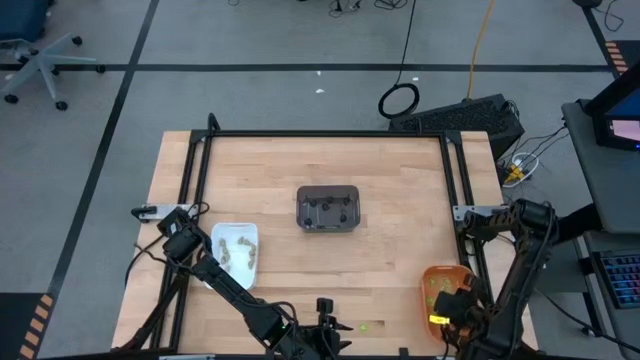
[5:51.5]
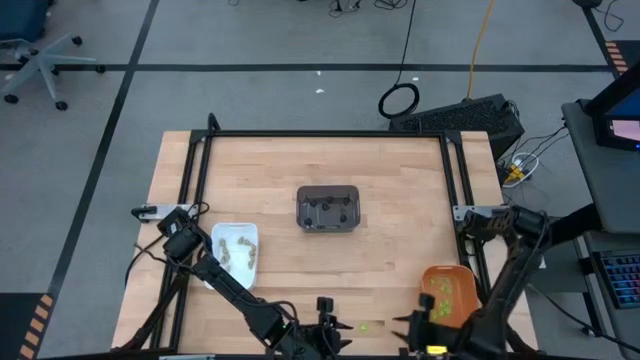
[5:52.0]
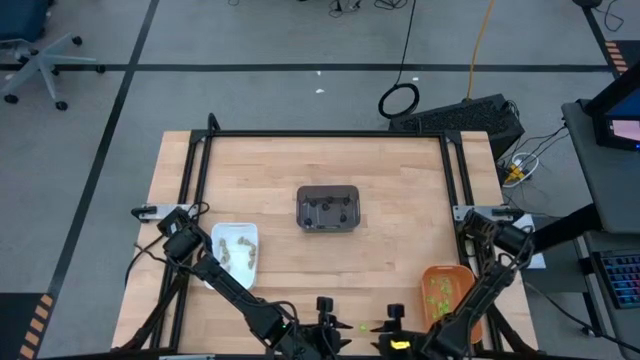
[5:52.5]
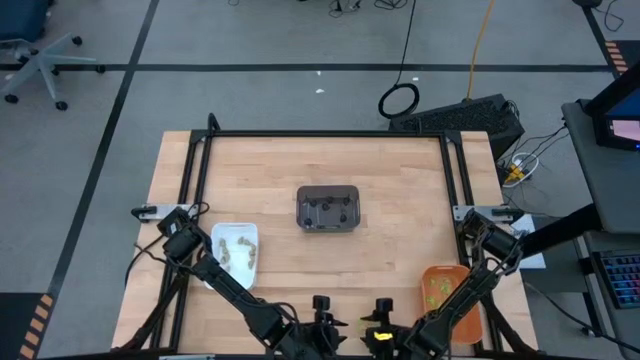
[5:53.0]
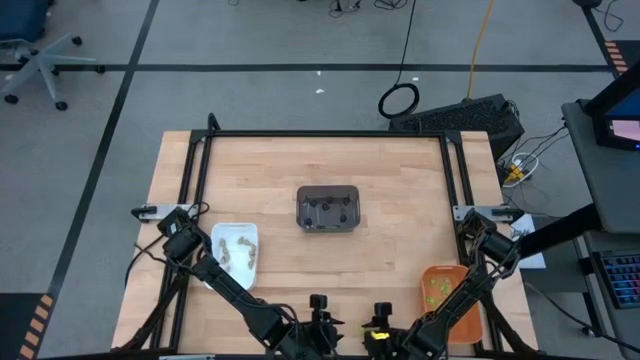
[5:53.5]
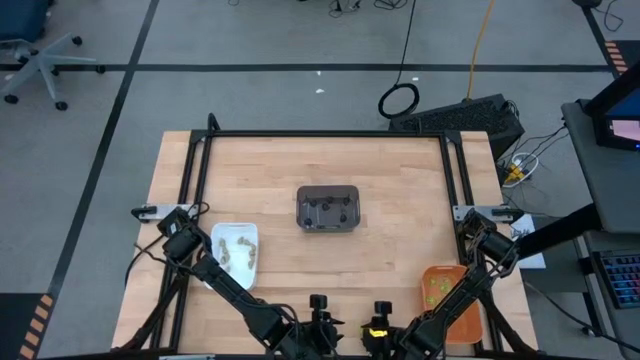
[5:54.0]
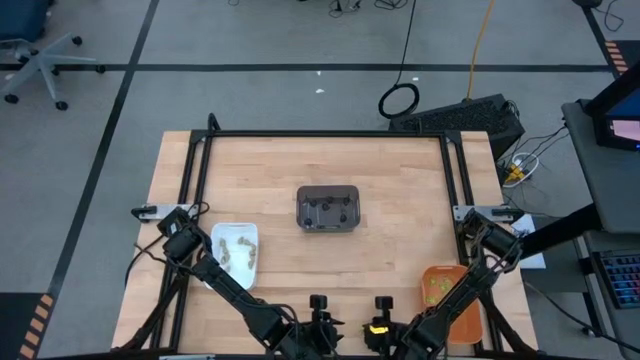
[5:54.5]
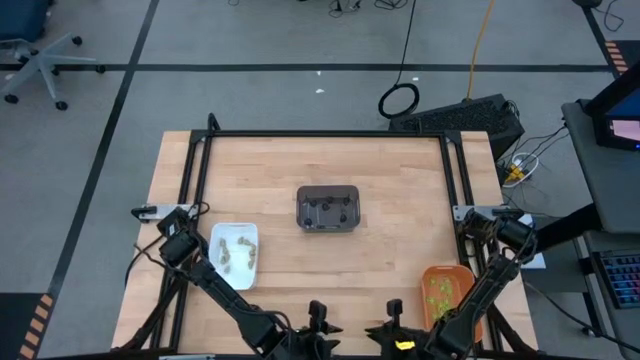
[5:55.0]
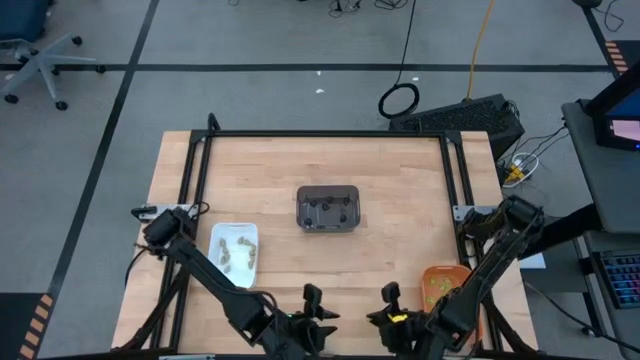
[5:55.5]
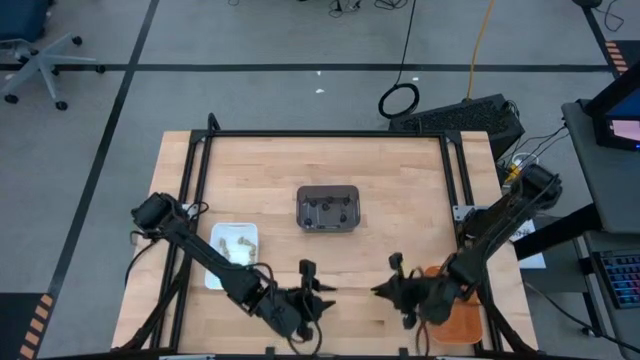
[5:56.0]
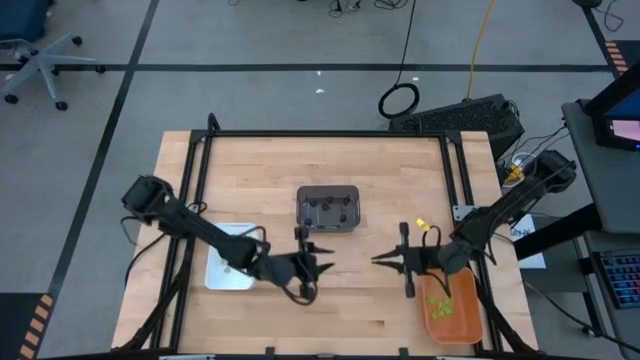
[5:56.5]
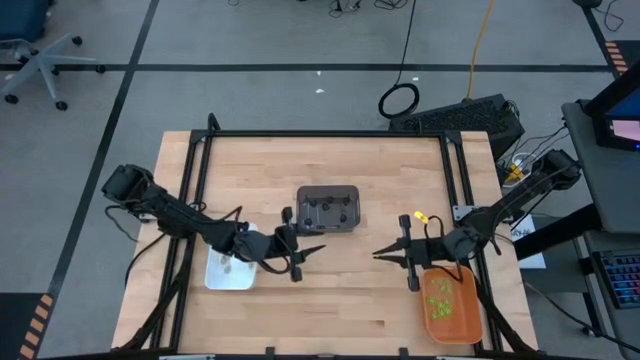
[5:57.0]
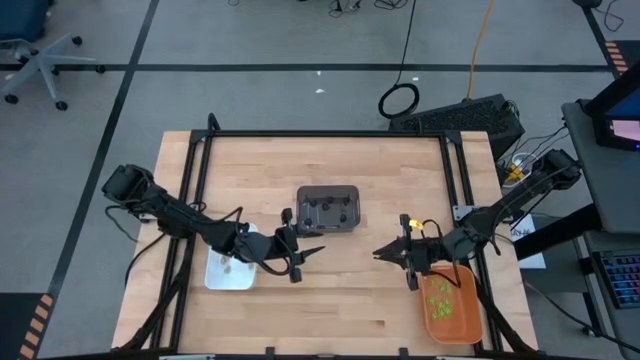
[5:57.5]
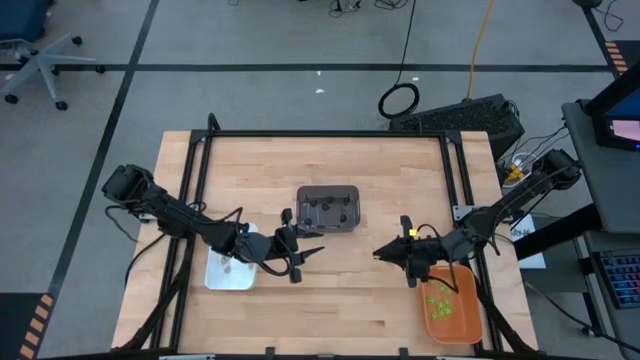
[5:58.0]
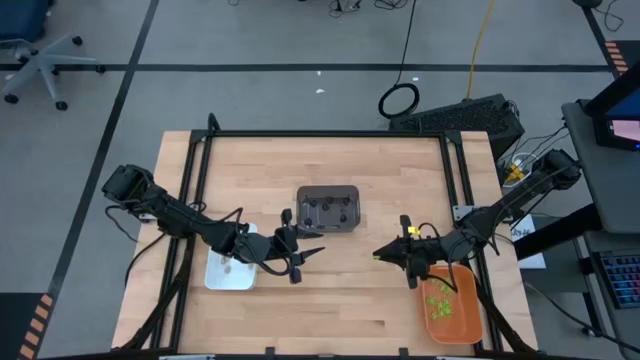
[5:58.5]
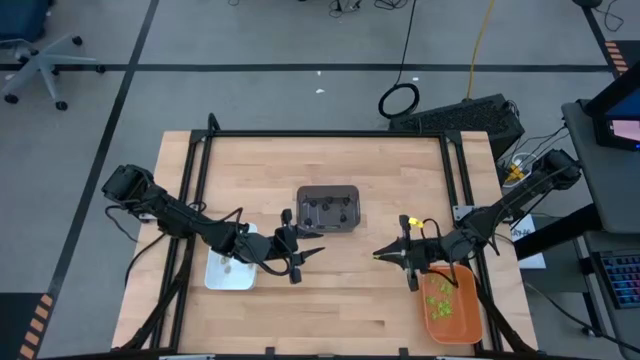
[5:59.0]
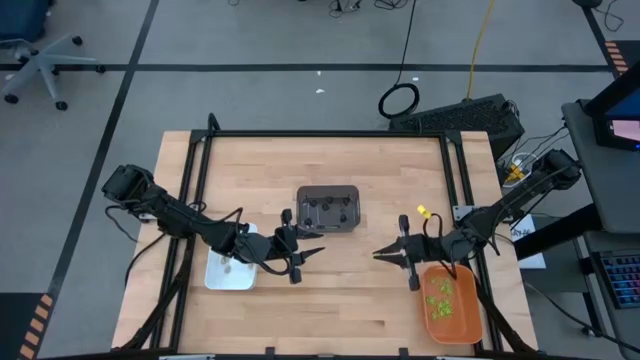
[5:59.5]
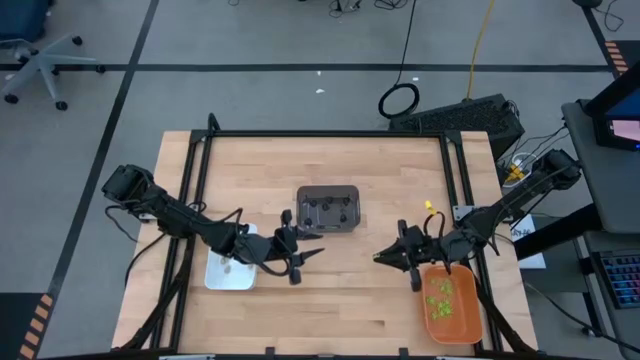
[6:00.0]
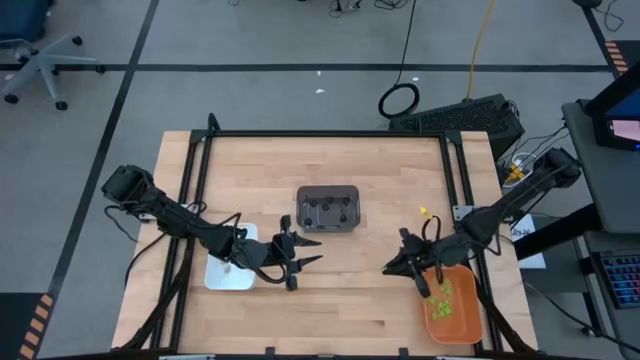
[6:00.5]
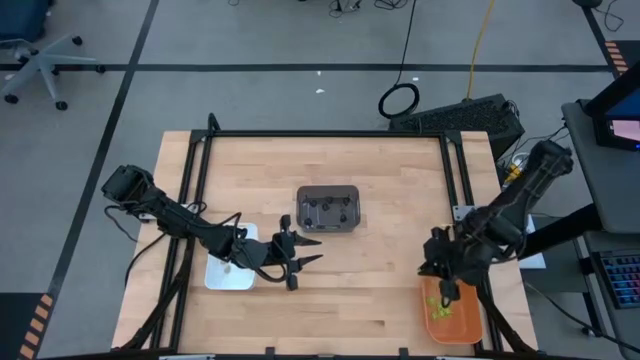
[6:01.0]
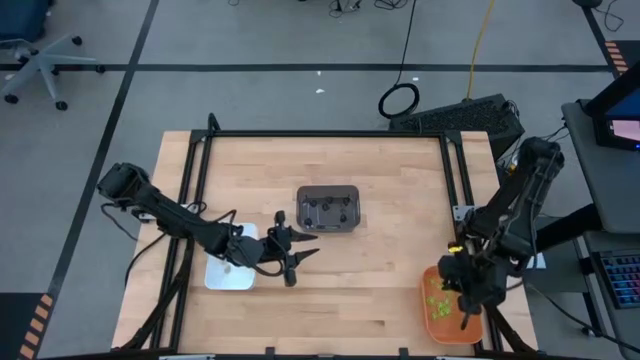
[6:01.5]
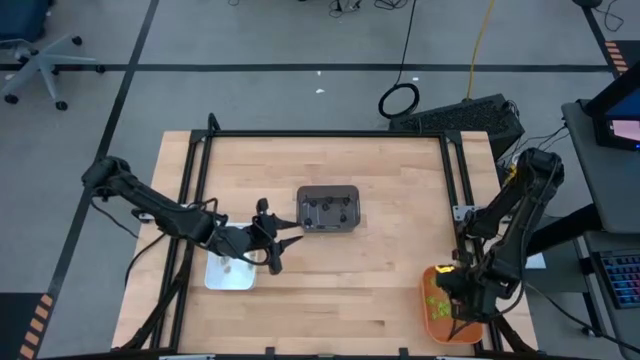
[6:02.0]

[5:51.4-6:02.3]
Task: Sort Halloween decoration
Put the green spider toy into the orange bin

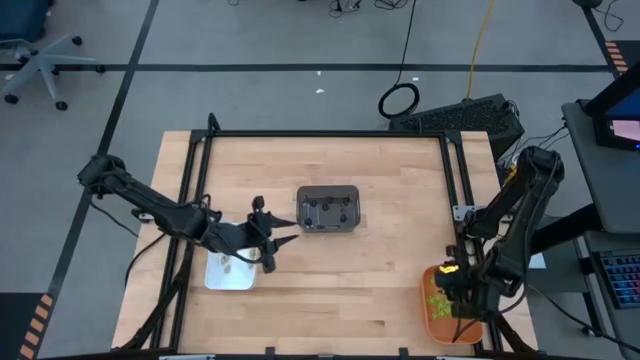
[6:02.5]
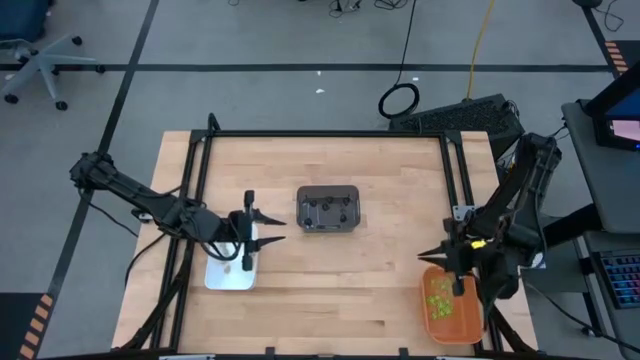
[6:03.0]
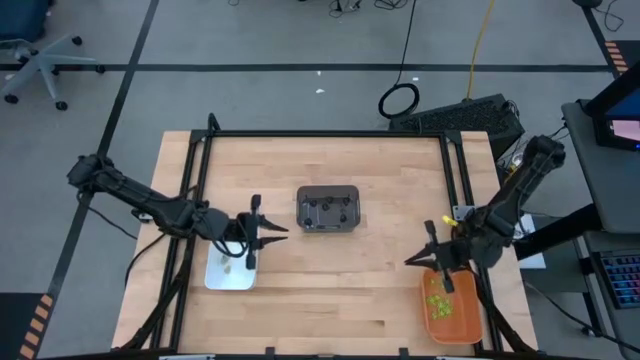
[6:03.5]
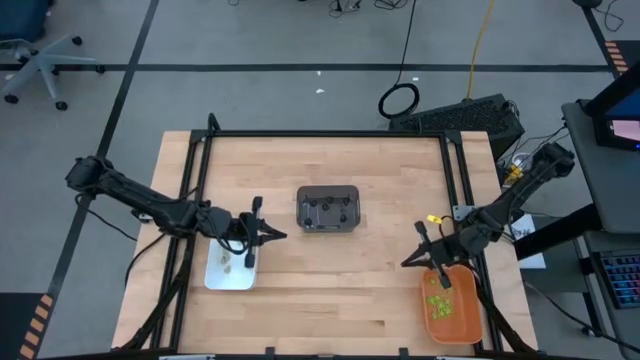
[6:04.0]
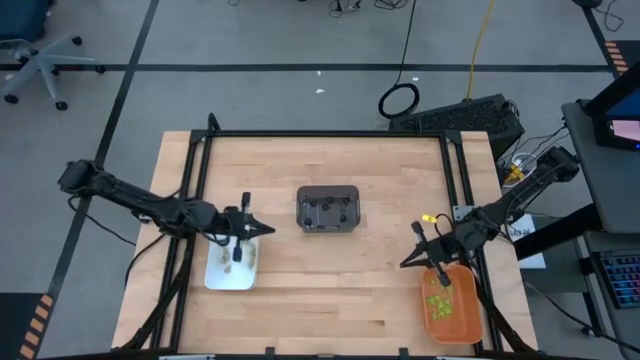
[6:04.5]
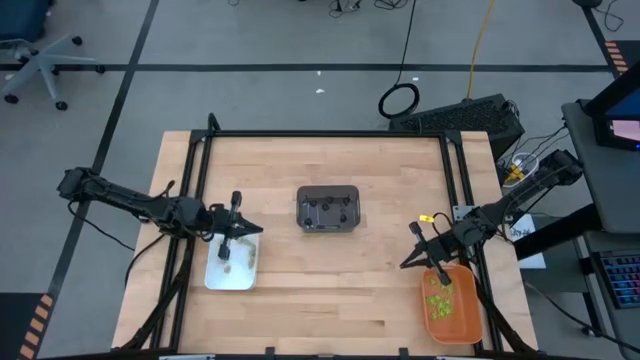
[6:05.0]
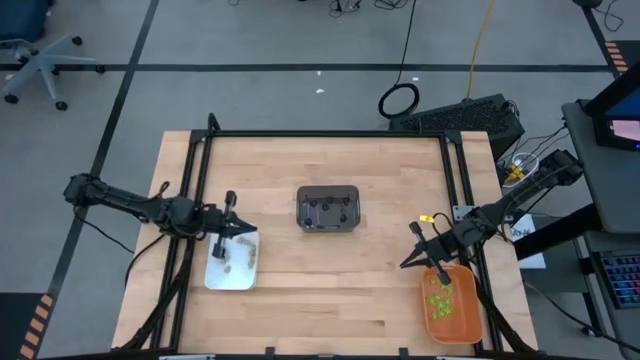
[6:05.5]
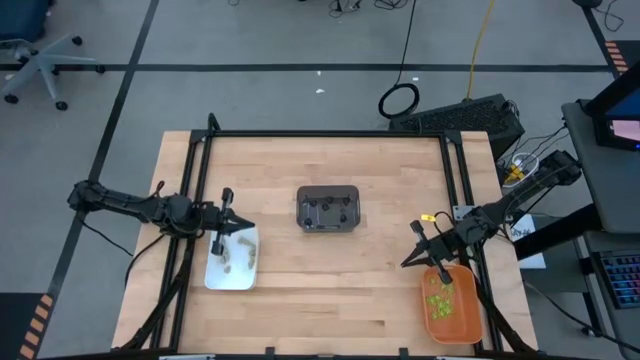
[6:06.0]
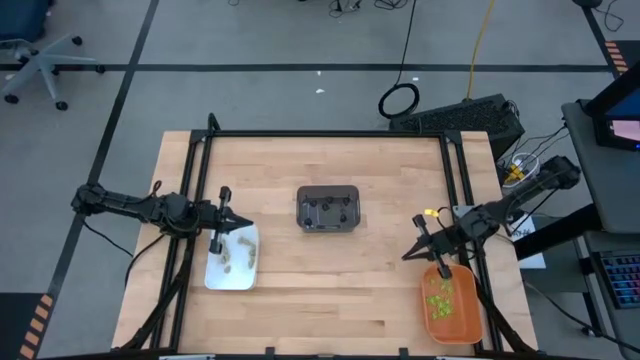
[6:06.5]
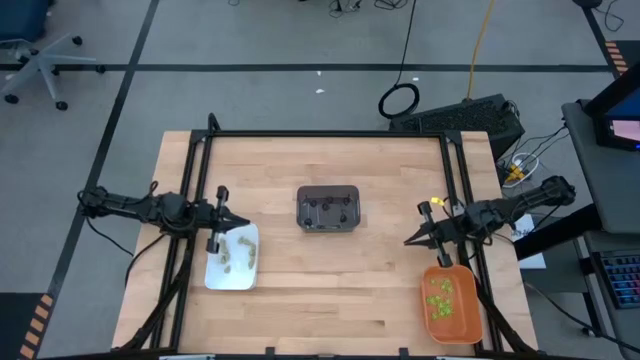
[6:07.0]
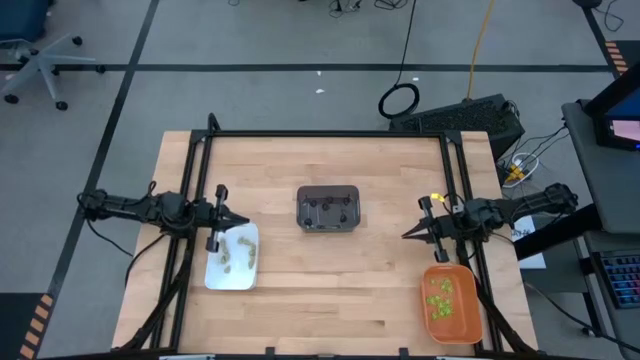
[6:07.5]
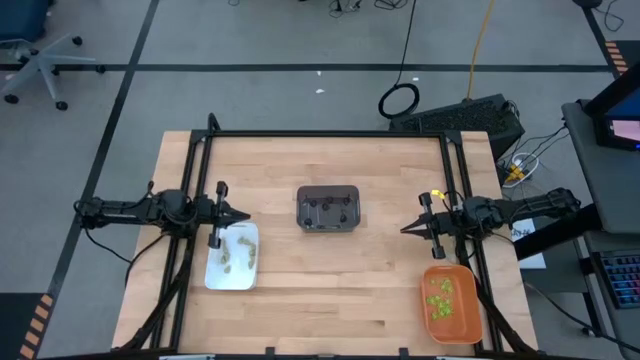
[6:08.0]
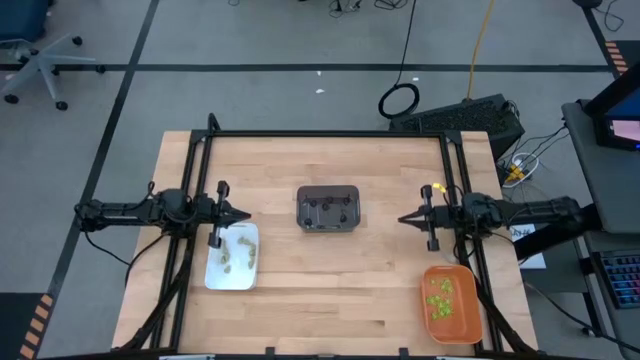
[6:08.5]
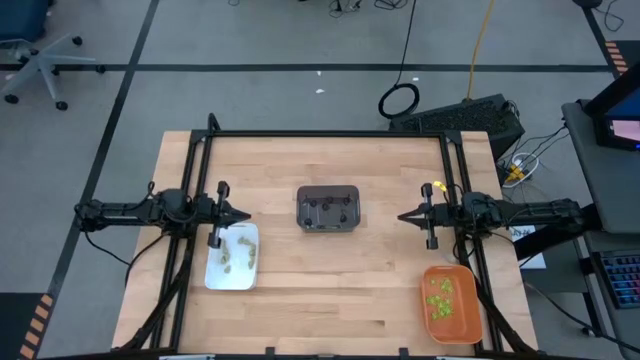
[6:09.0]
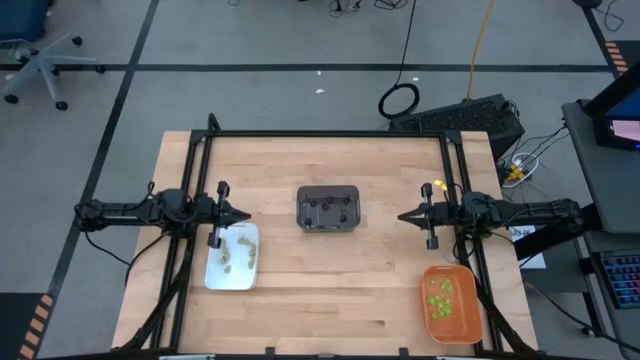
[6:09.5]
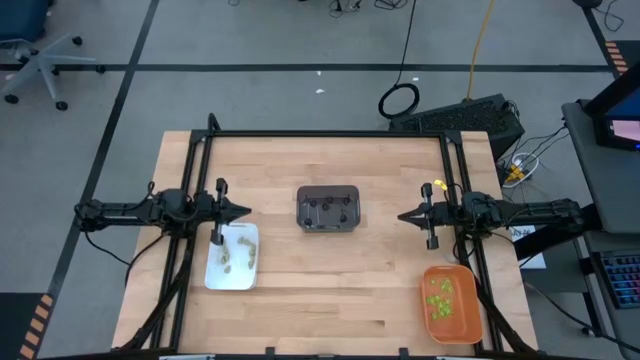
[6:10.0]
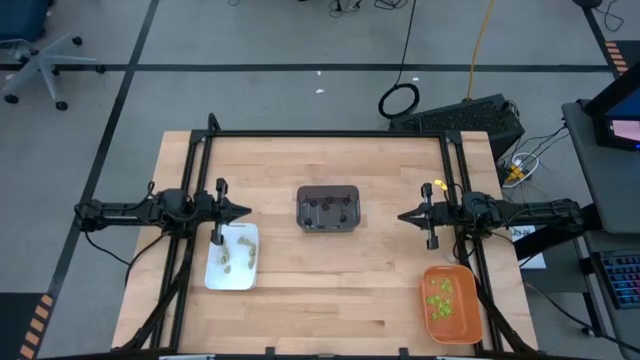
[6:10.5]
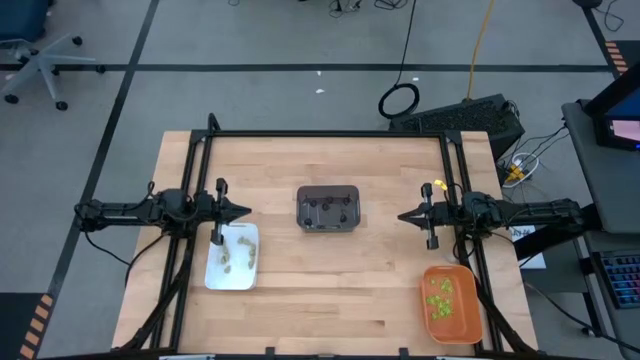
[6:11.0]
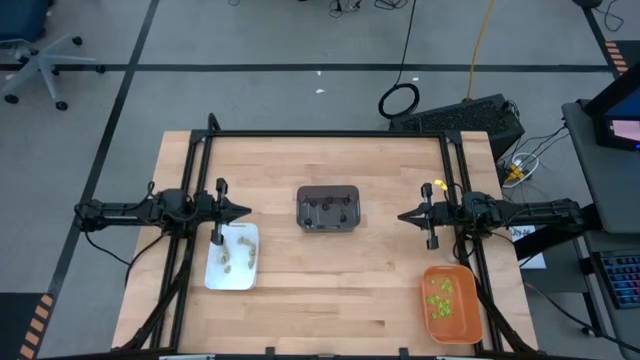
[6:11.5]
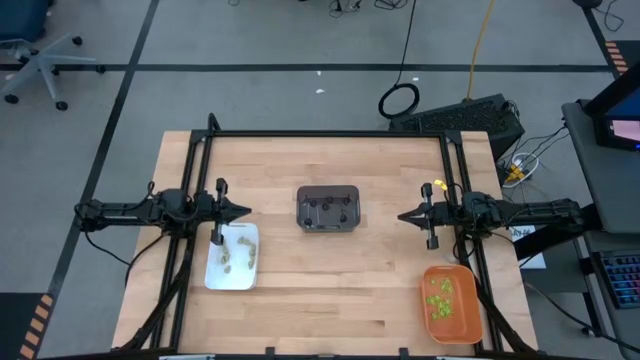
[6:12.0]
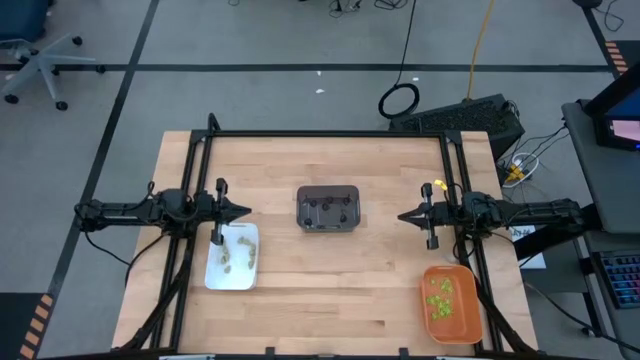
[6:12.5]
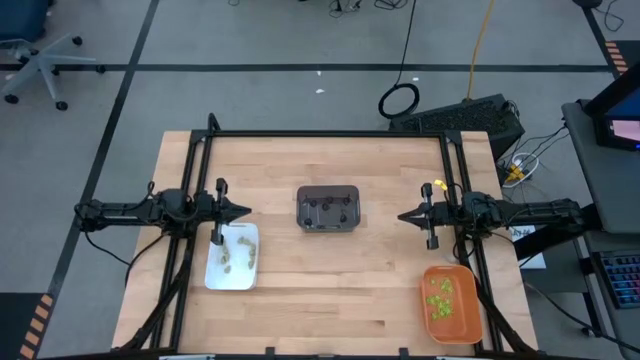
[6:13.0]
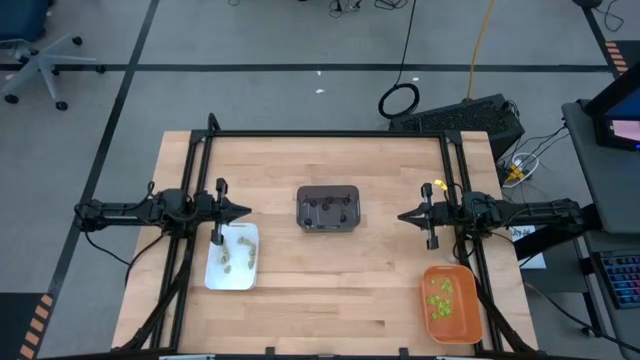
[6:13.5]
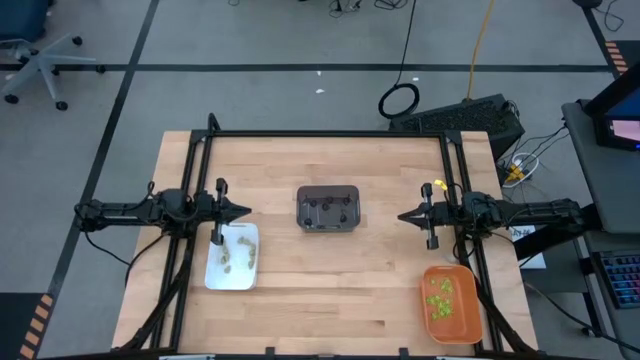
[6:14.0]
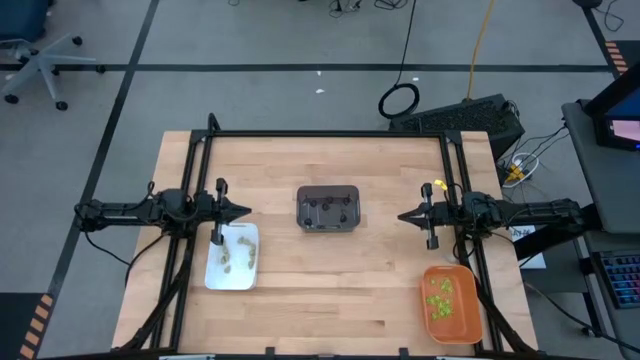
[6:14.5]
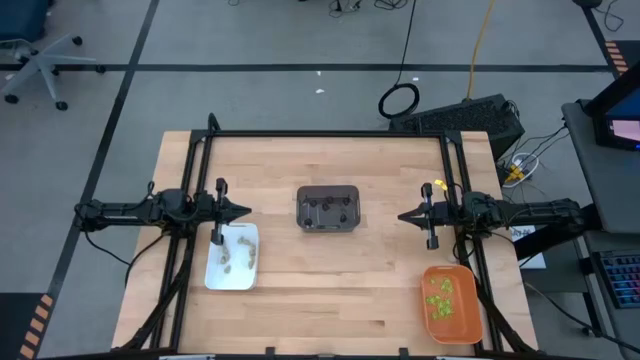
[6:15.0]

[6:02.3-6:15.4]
Return to Home Position
